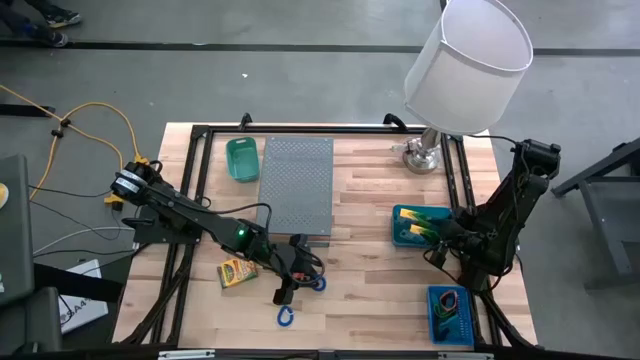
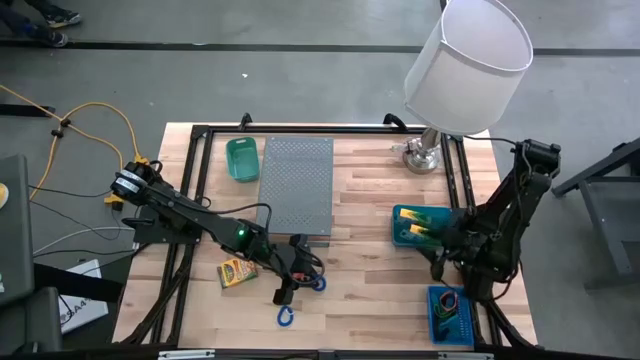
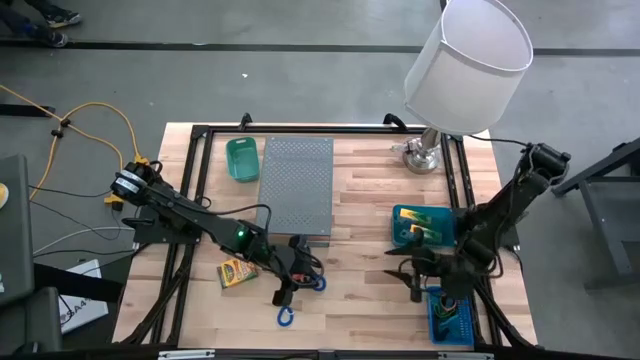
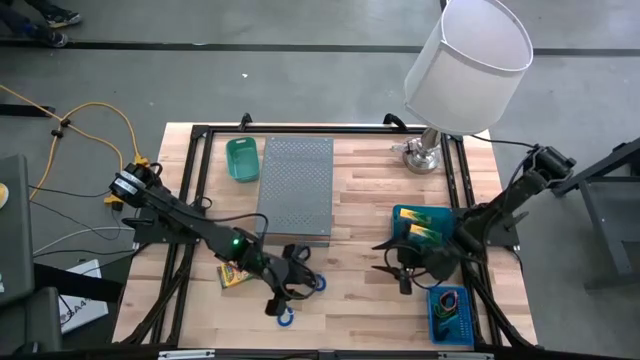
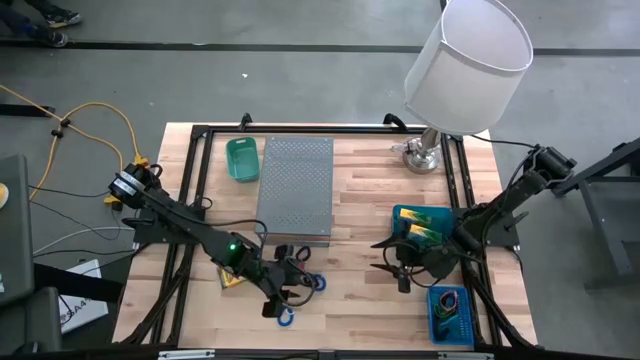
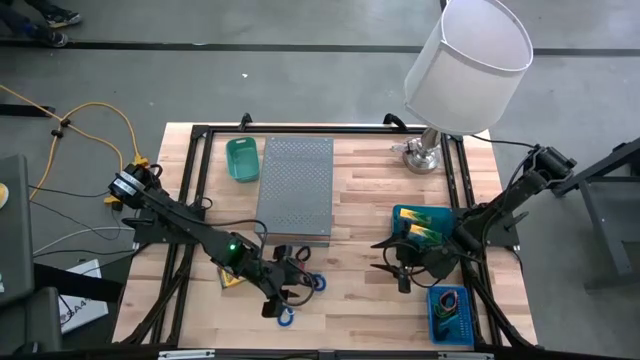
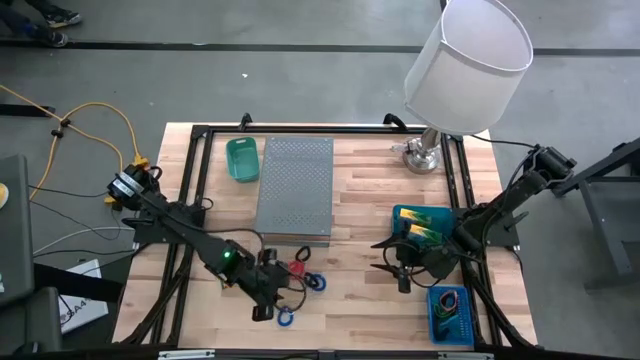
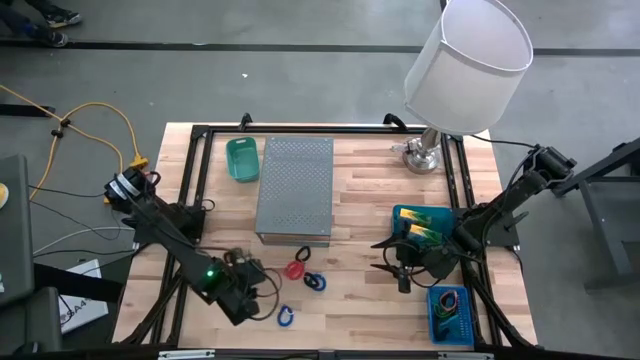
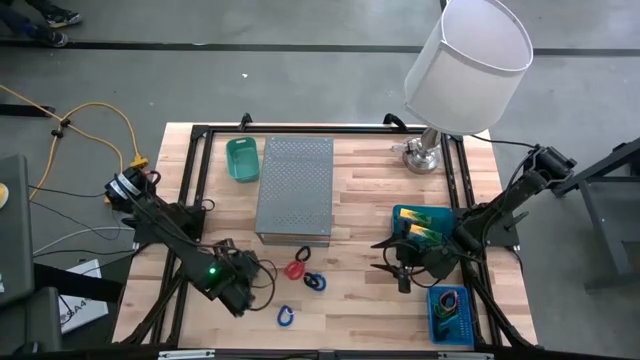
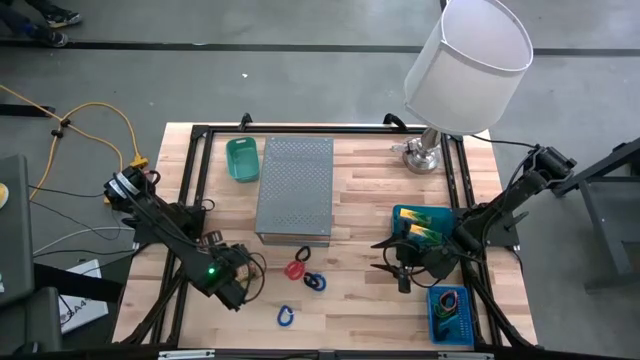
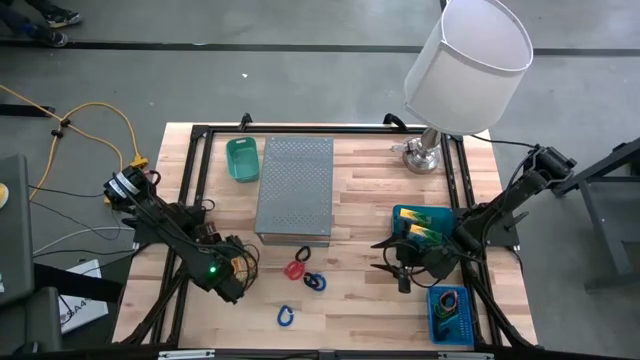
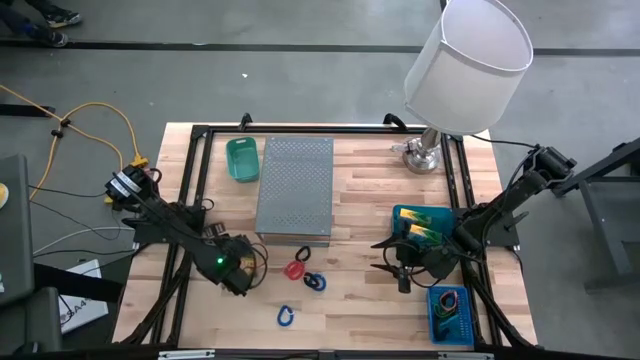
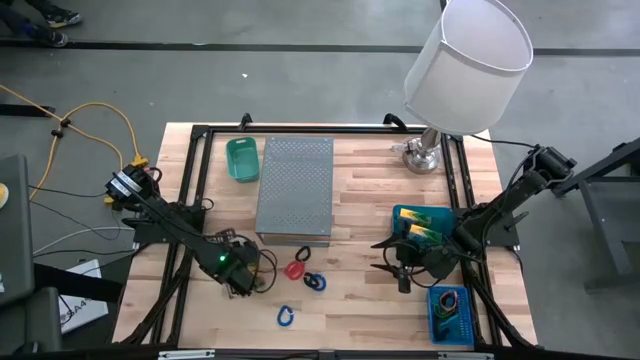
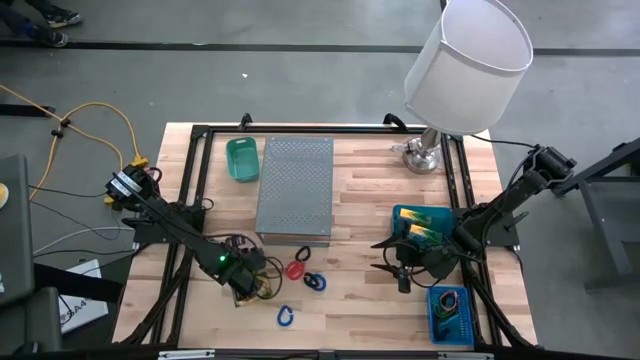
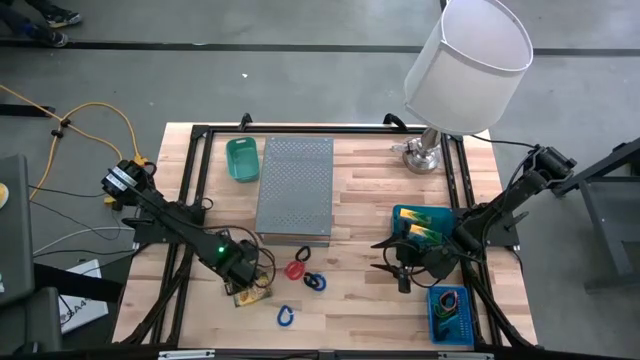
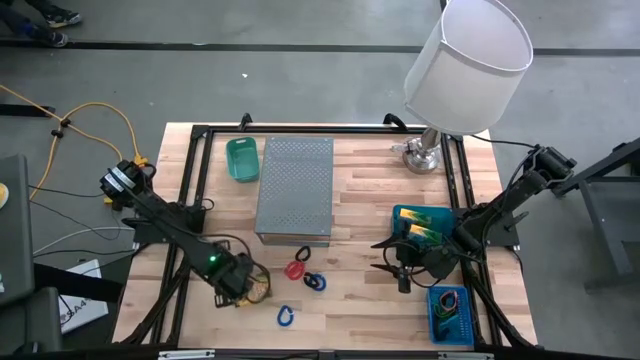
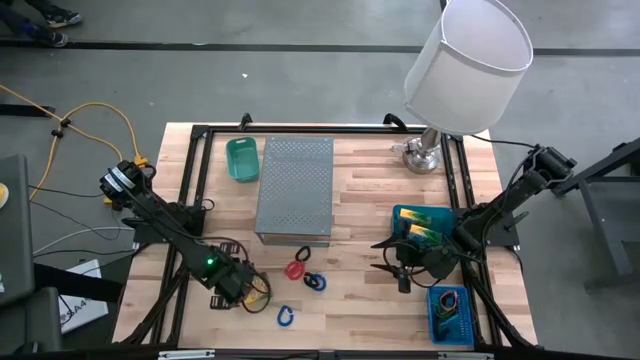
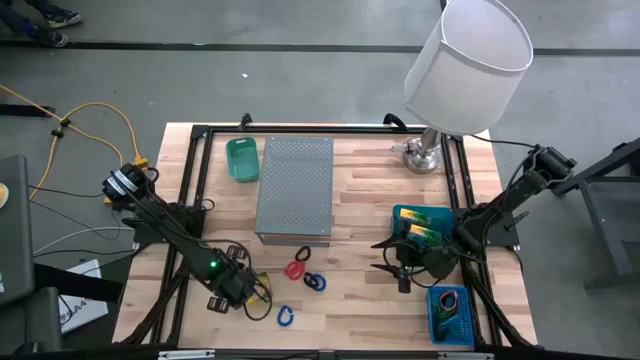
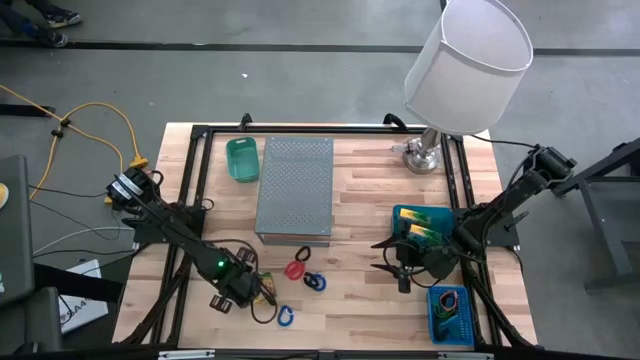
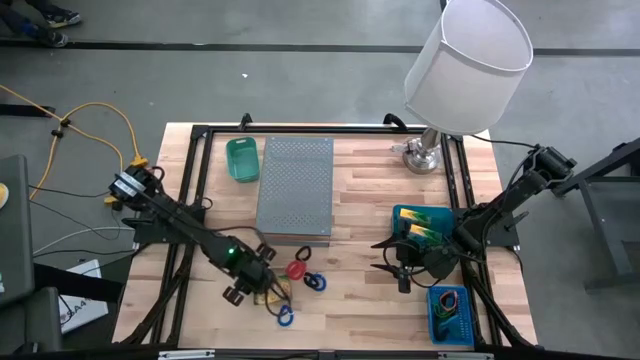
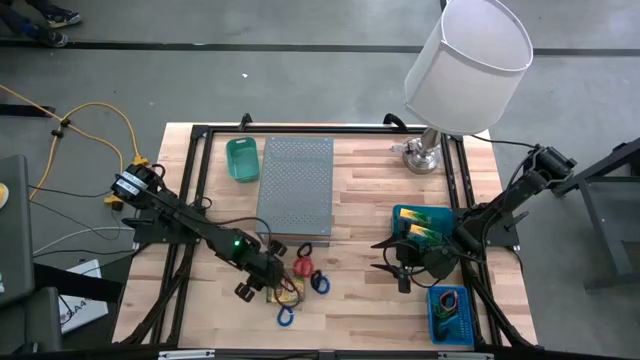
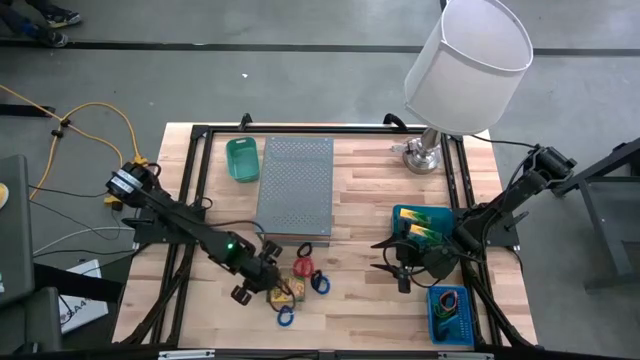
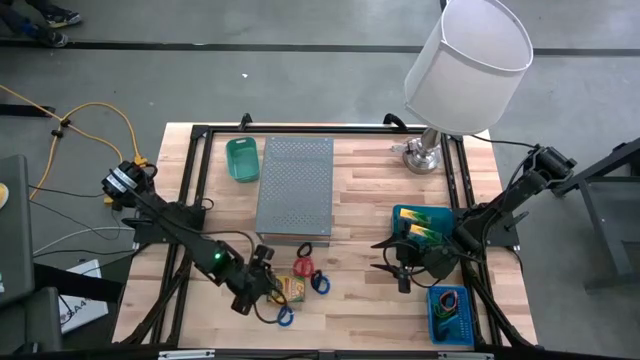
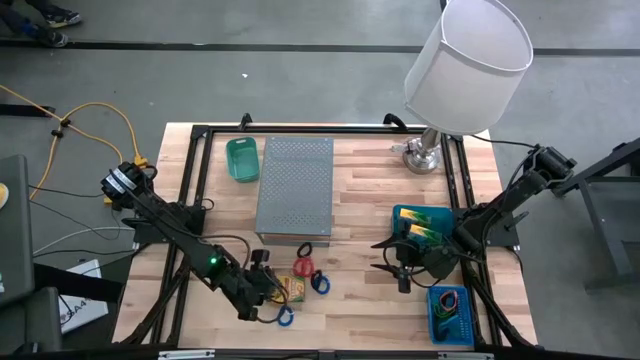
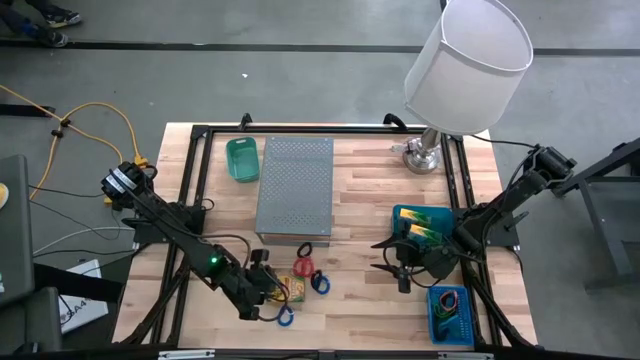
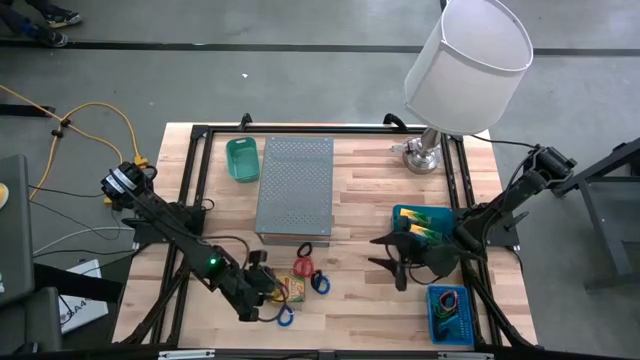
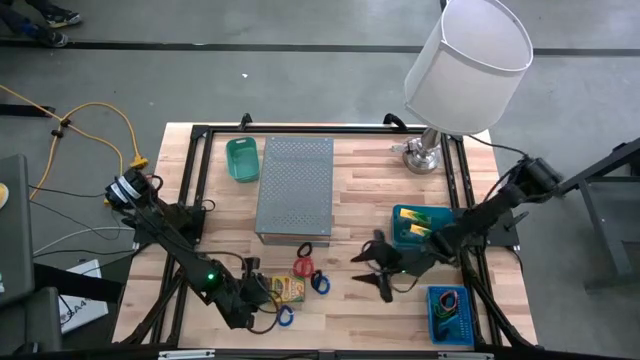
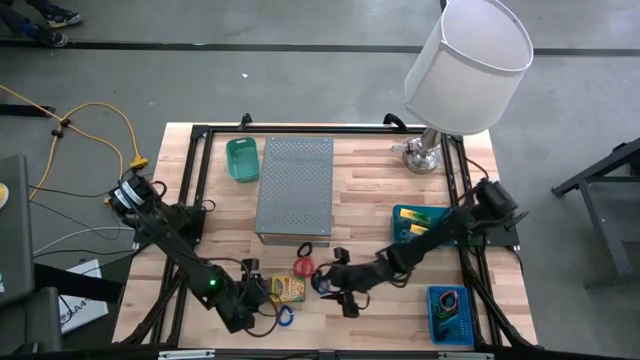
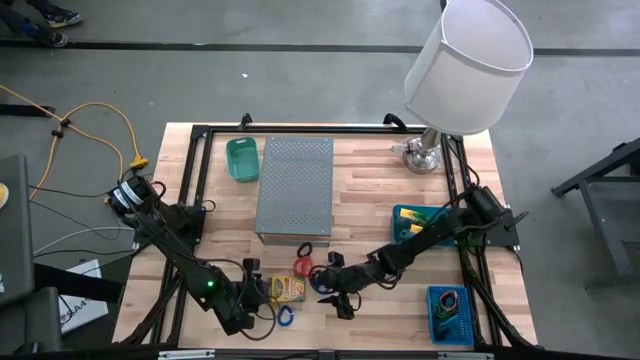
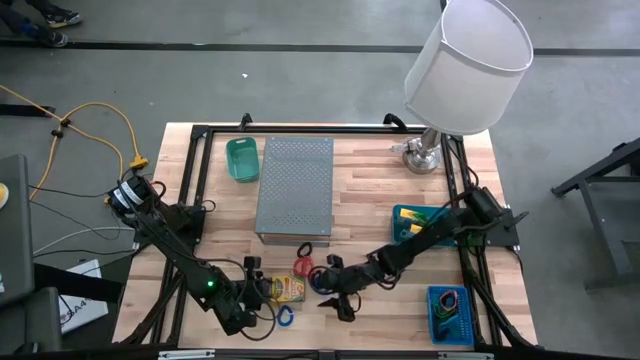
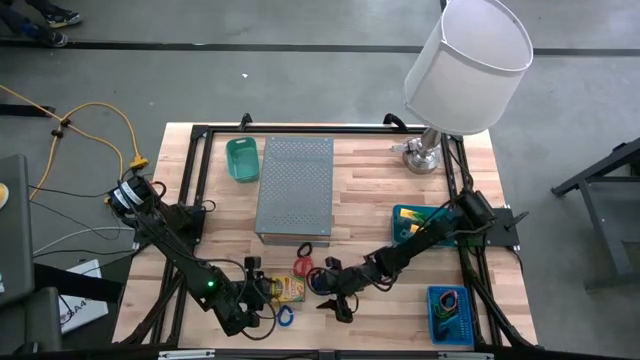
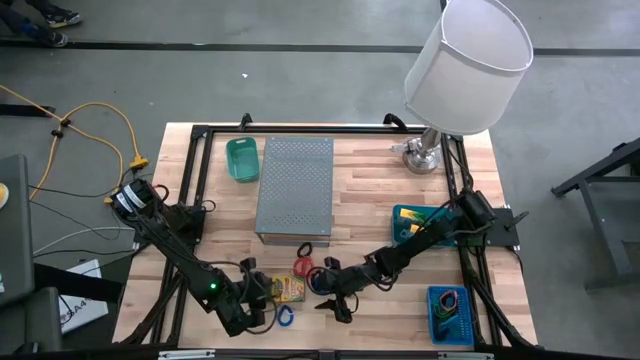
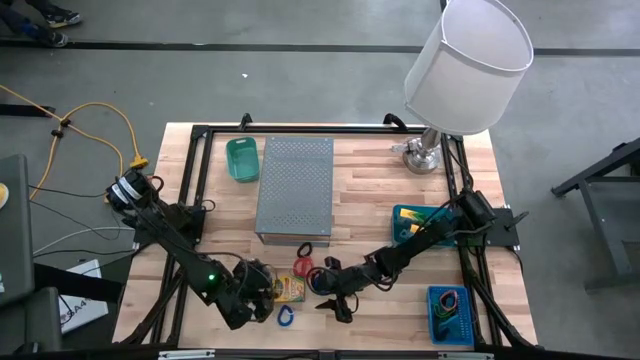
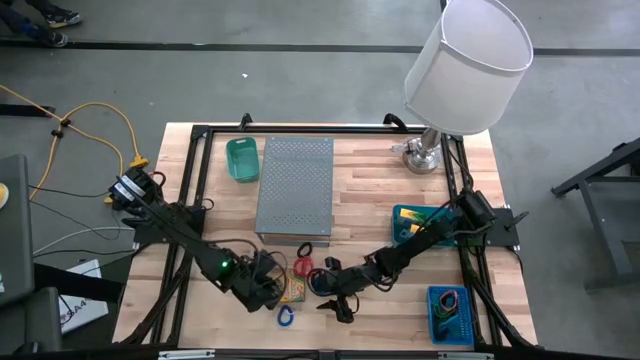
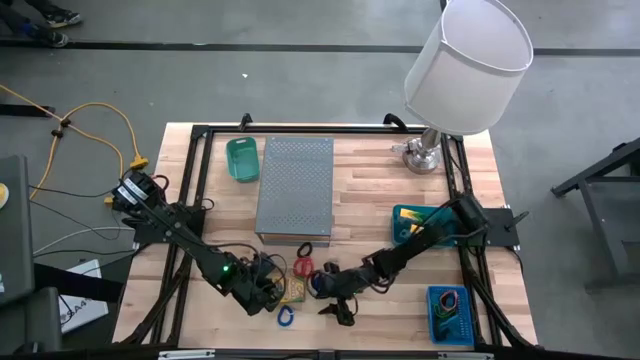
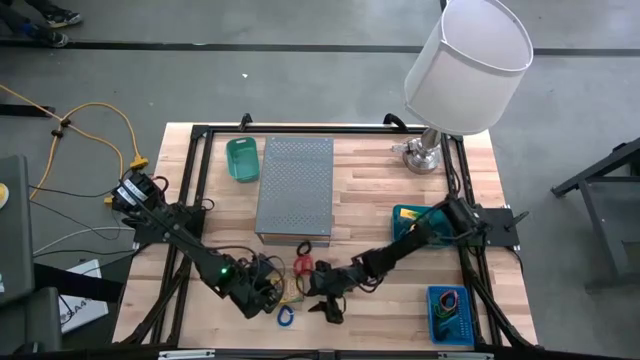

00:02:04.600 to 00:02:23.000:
Task: Pick & Place Office Desk Supplies
Put the crayon box into the blue bin

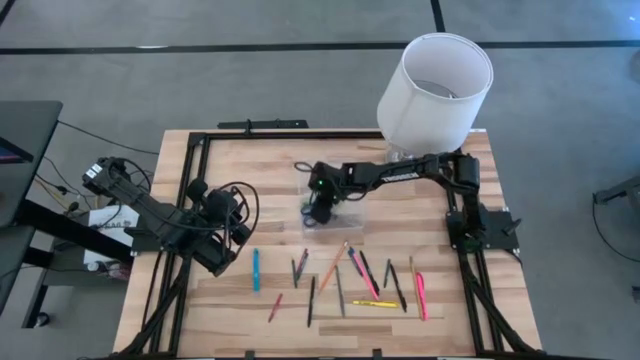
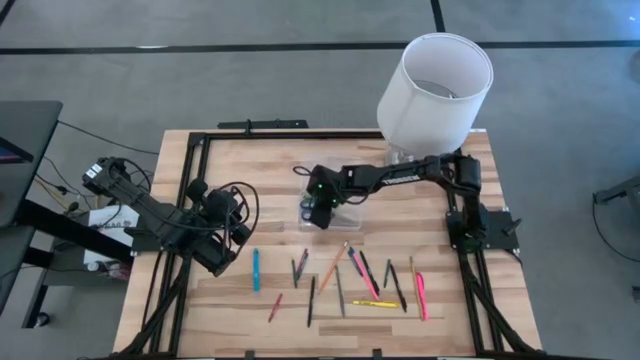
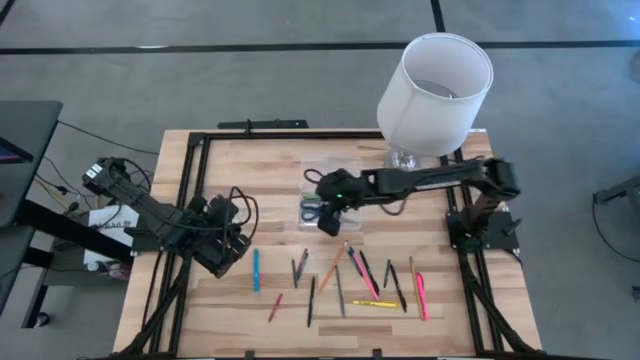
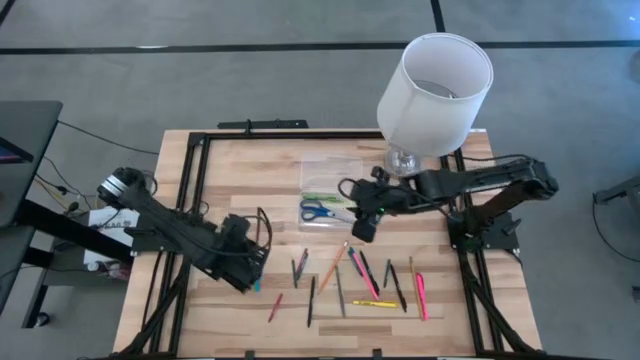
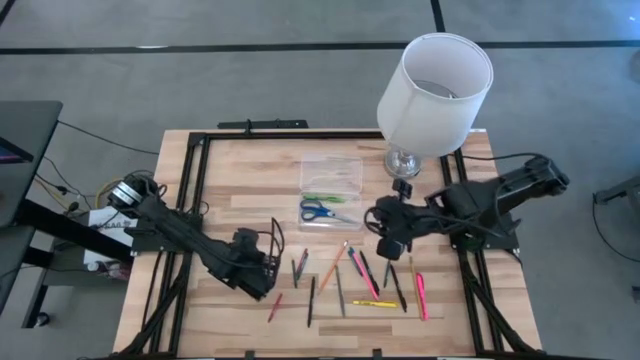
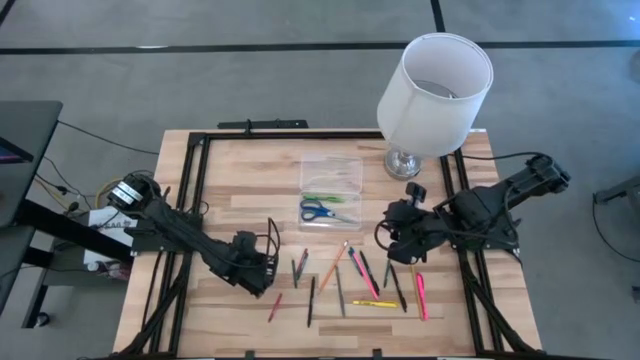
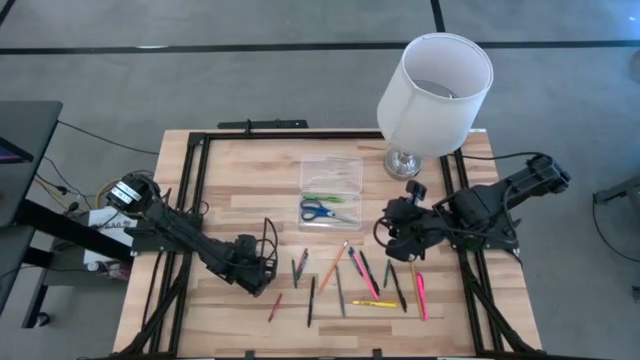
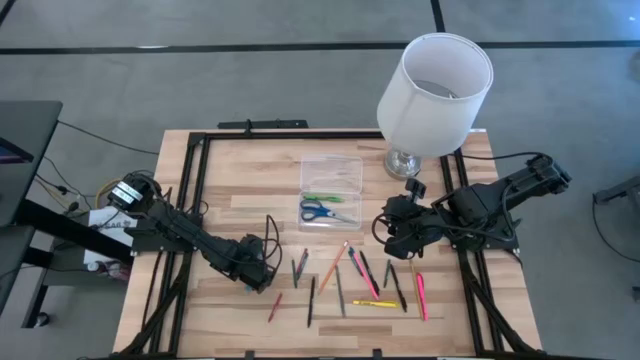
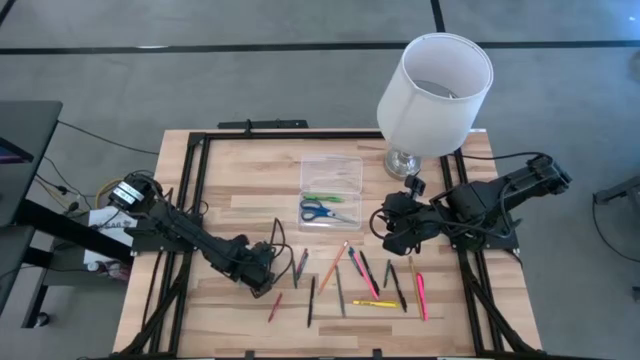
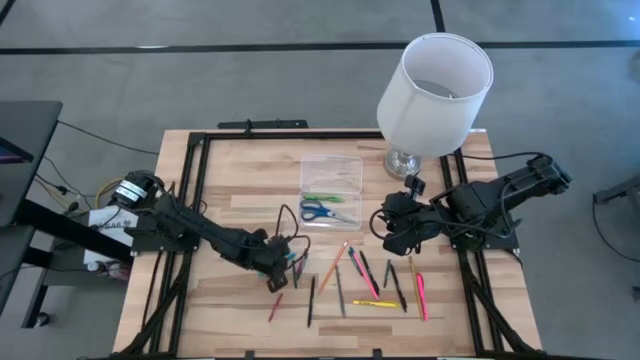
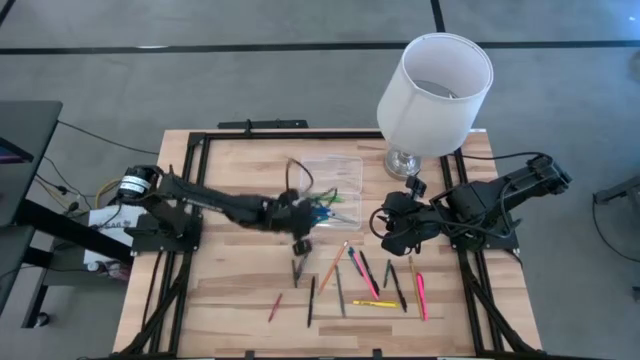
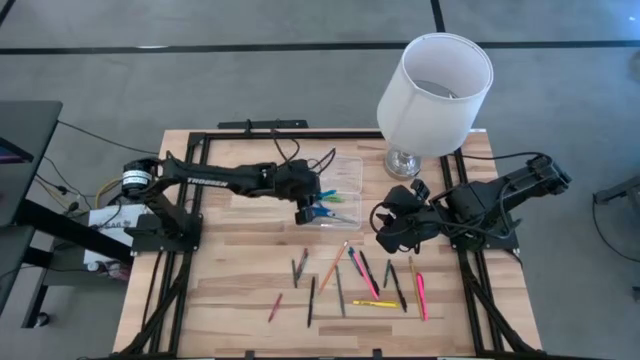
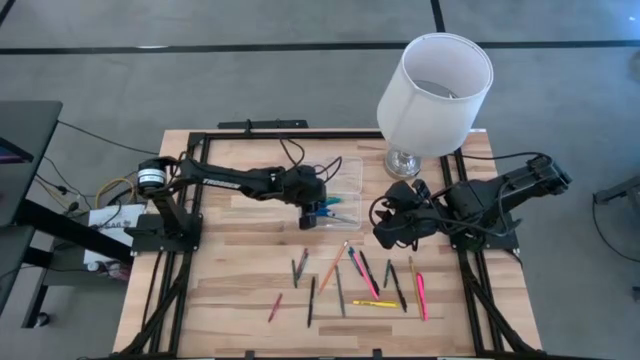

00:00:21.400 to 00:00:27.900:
Task: Pick & place school supplies into a supply box
Put the blue ballpen into the transparent supply box
